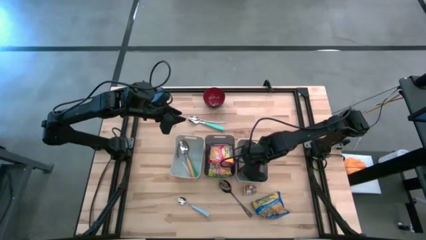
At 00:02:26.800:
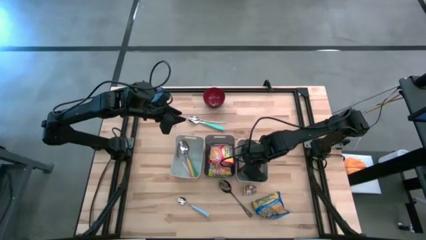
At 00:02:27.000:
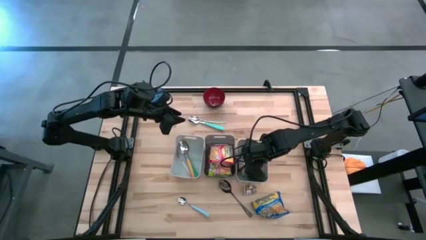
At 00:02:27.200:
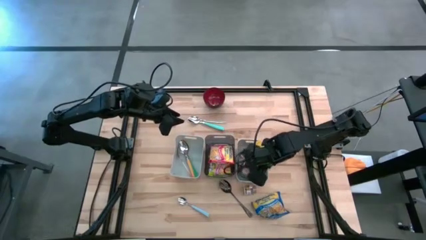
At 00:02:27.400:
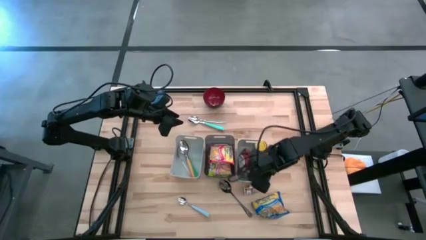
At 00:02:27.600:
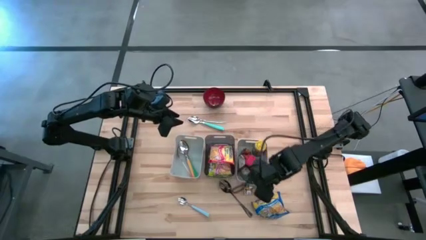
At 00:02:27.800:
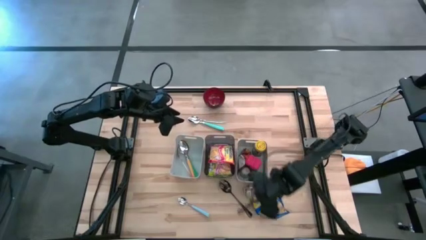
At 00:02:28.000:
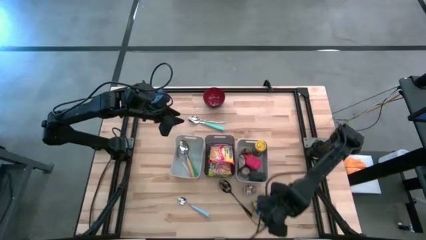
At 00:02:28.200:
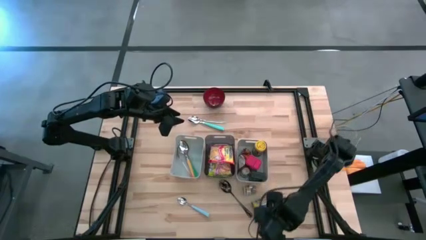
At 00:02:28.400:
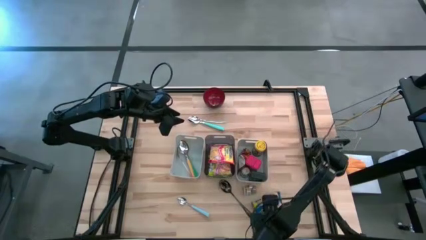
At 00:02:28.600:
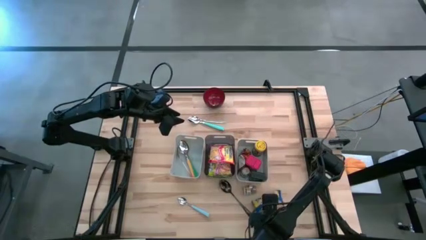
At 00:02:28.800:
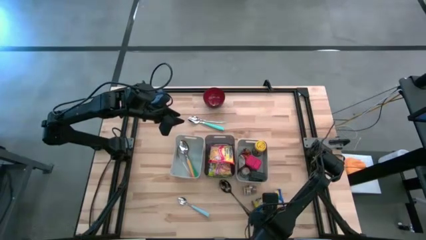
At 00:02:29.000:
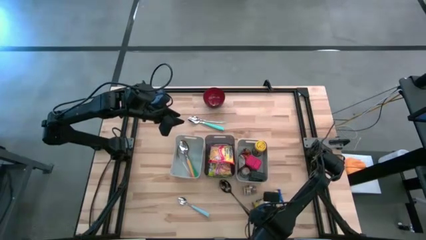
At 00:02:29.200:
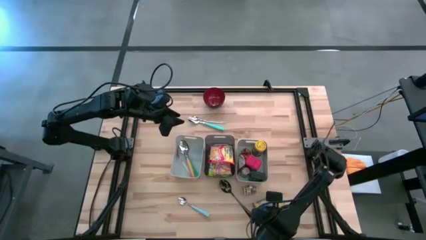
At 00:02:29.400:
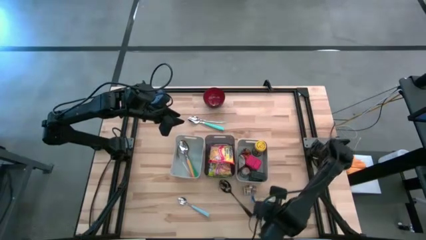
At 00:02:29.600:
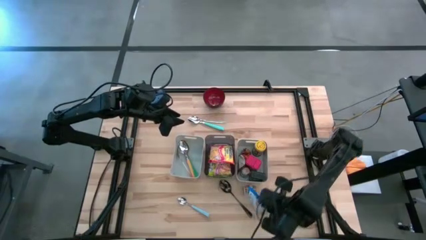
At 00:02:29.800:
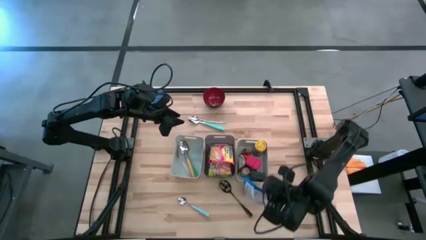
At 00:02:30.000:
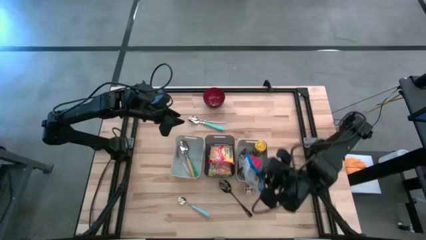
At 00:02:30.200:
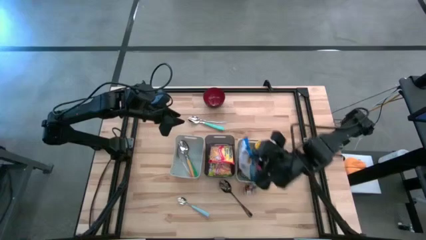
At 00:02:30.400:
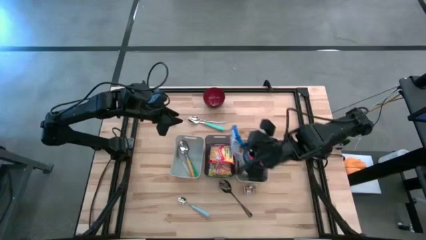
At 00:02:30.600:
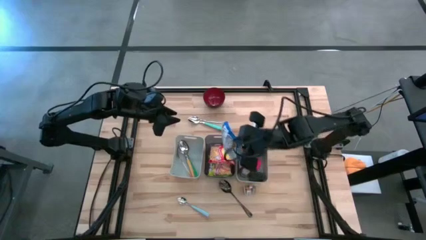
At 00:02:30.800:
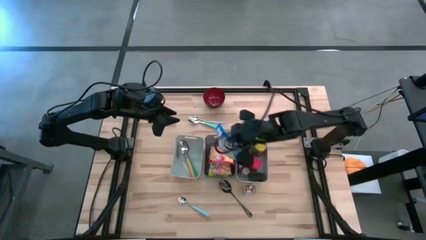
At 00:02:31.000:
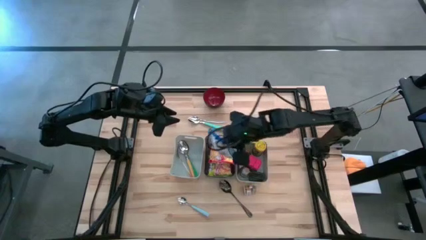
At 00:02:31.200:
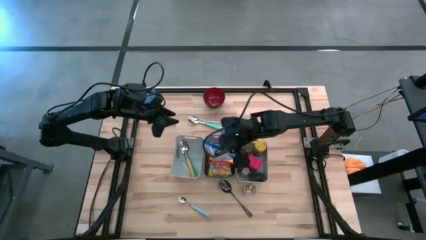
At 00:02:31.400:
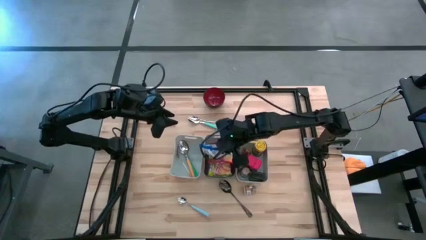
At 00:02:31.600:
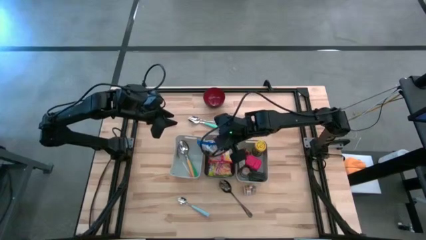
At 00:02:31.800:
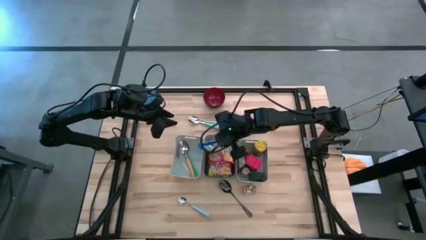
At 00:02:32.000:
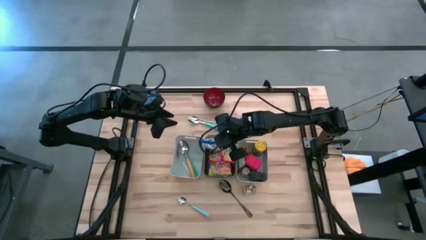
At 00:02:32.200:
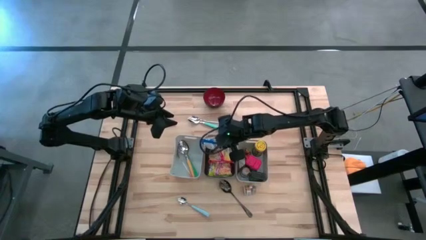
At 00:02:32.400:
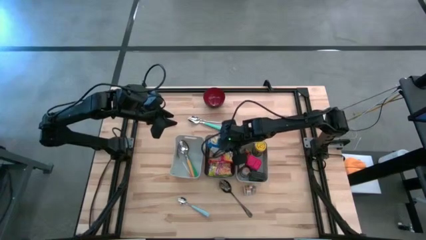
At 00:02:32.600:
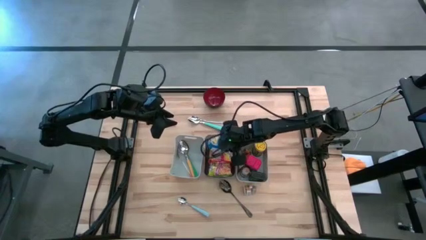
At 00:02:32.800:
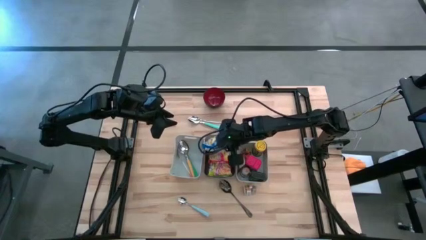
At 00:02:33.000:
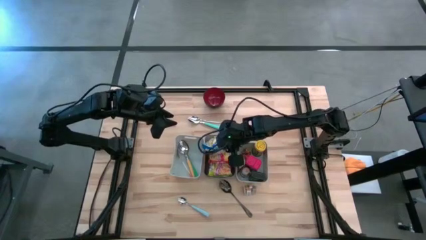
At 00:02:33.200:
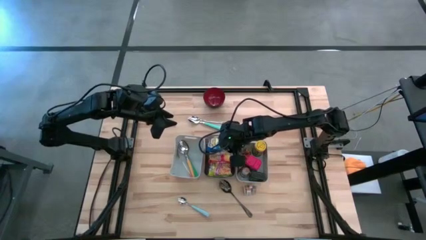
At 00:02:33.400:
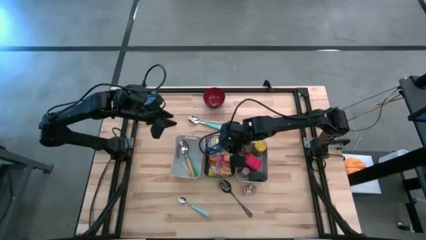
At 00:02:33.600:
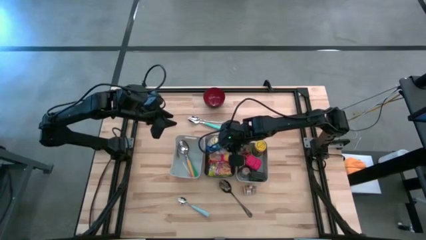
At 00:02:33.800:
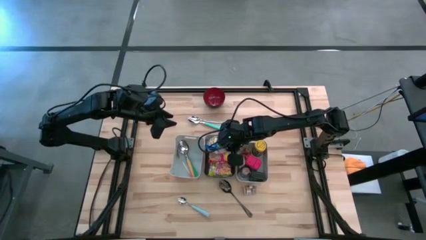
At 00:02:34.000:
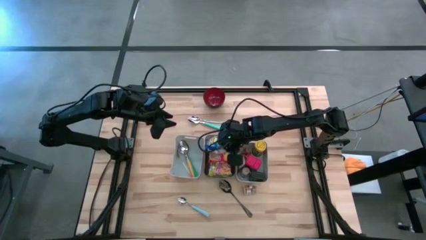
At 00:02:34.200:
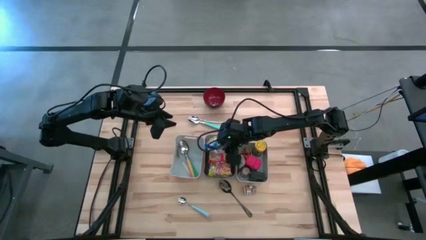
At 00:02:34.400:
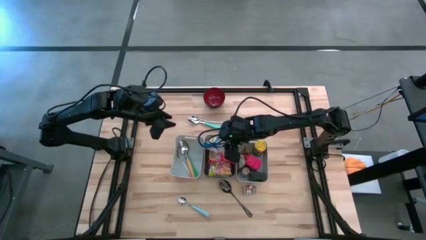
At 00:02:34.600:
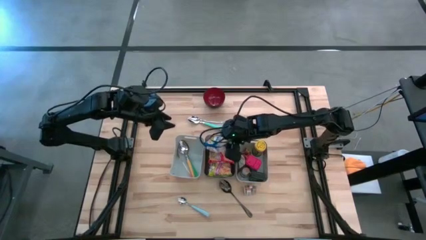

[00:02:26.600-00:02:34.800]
Put the blue noodle pack into the black bin

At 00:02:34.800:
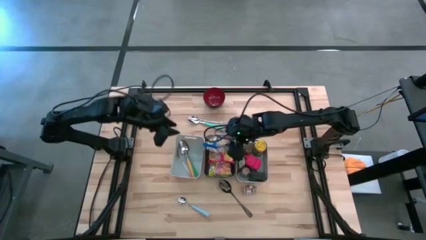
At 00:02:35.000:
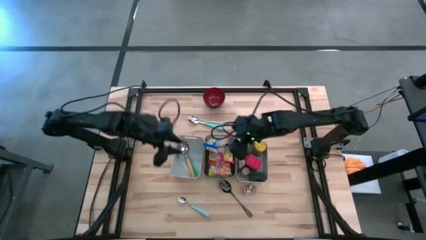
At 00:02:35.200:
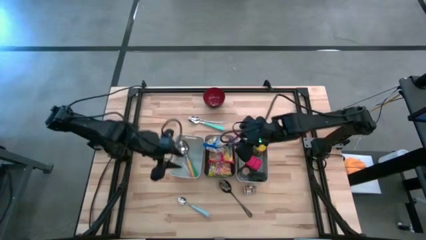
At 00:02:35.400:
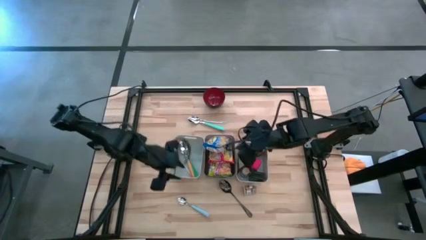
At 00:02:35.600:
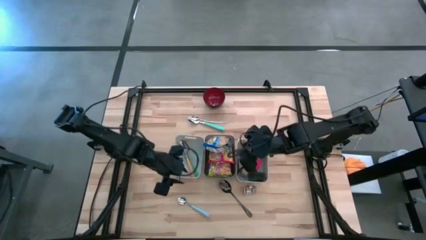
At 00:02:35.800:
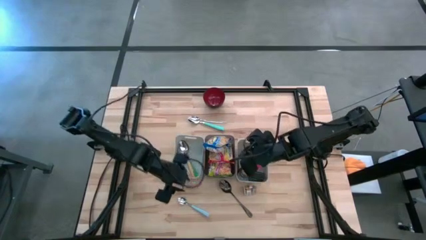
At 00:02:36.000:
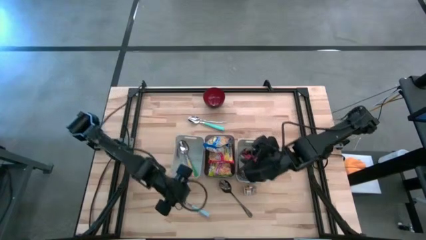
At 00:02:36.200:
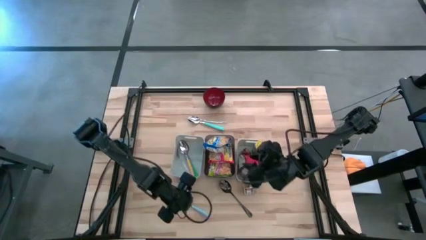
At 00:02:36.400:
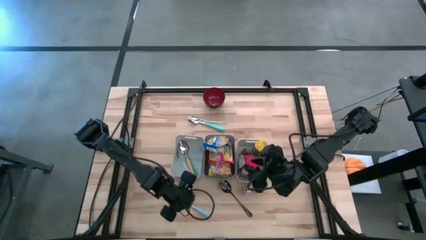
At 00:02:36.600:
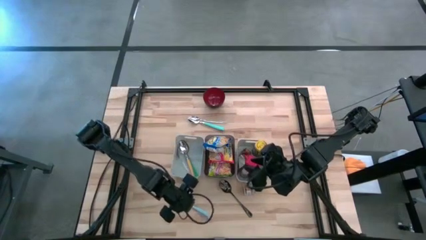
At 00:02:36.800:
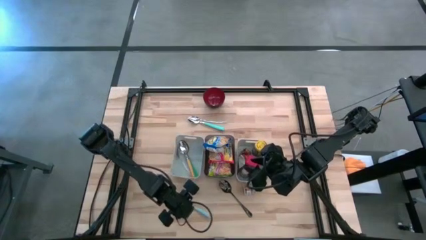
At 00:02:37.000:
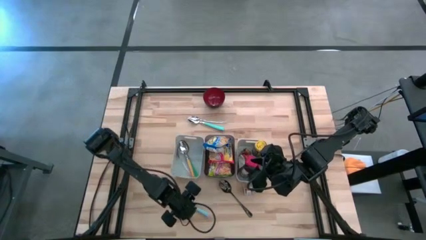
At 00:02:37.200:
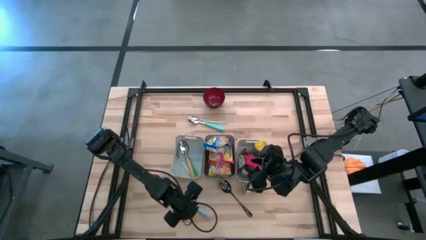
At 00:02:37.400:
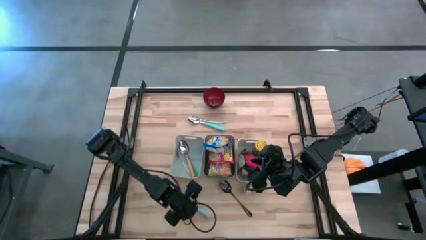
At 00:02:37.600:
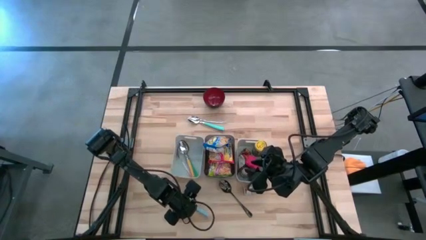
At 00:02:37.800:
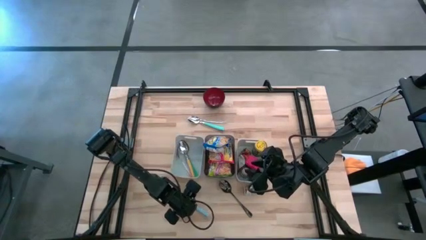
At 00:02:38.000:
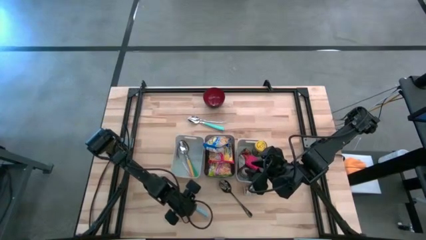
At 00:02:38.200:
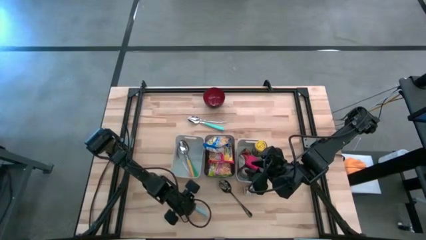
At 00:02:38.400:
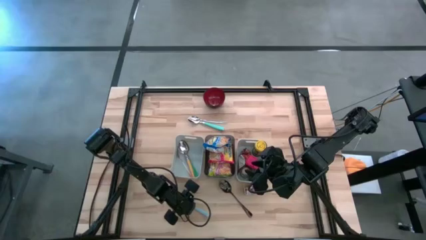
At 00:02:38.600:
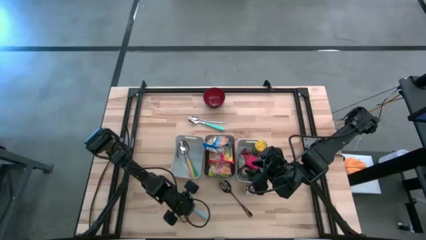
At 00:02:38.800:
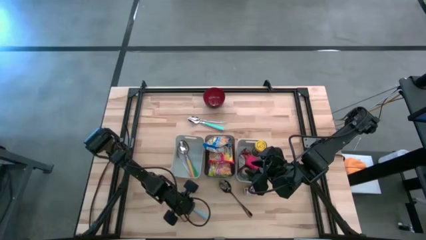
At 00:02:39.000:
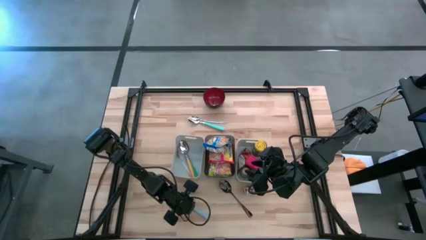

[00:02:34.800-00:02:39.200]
Put the light blue spoon into the left gray bin
